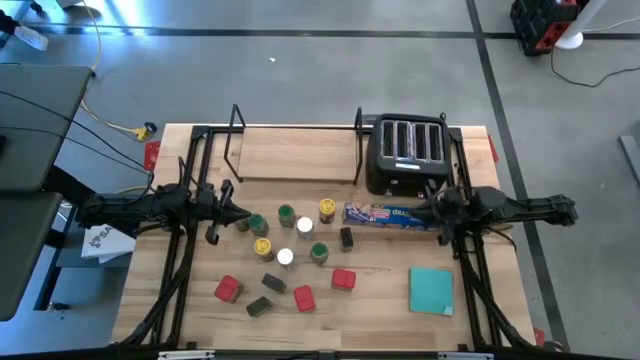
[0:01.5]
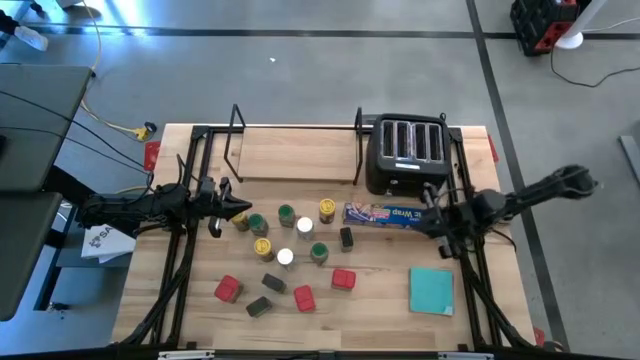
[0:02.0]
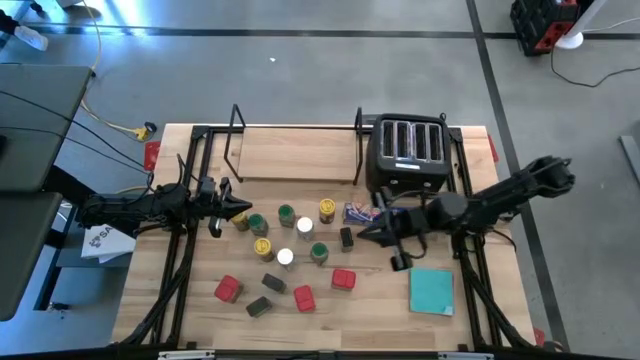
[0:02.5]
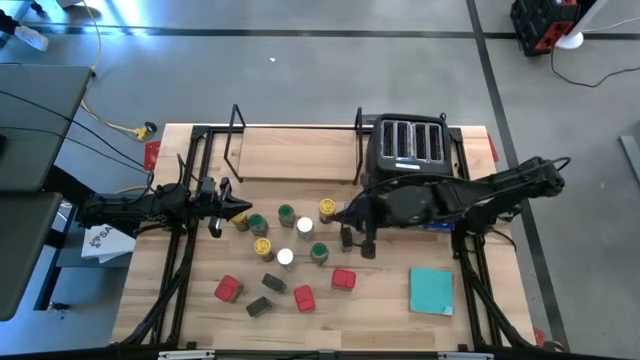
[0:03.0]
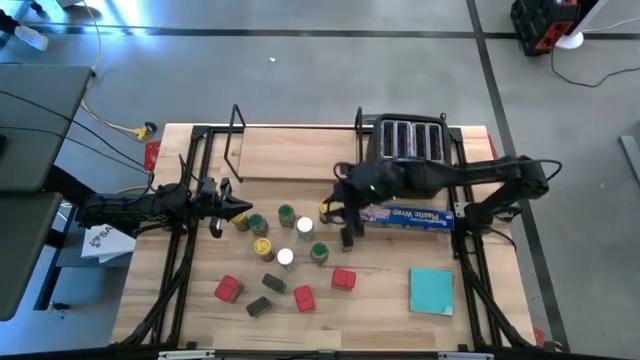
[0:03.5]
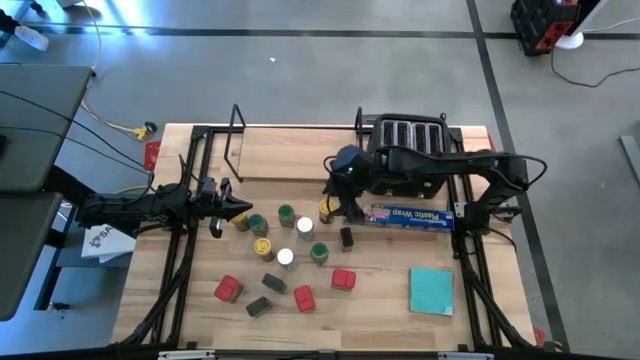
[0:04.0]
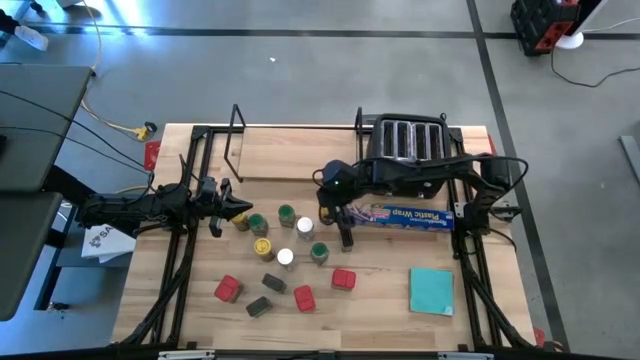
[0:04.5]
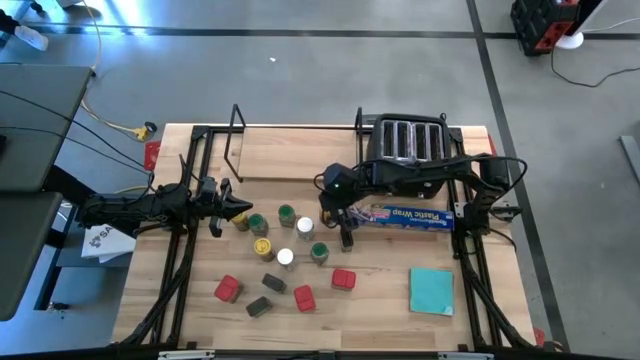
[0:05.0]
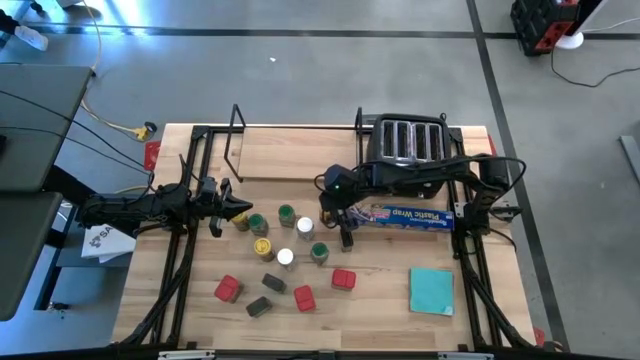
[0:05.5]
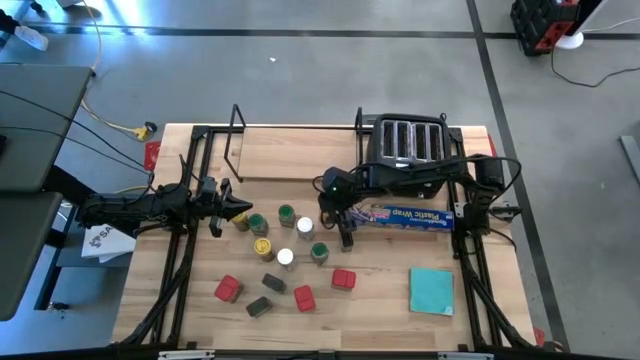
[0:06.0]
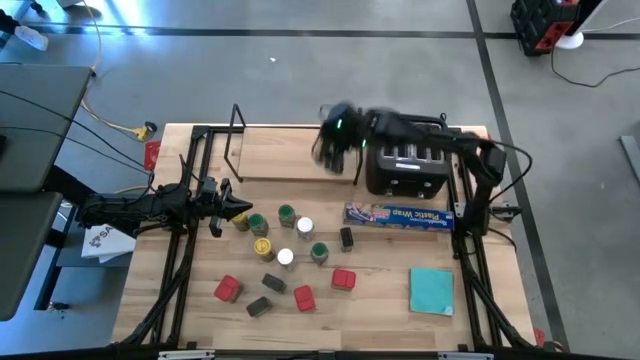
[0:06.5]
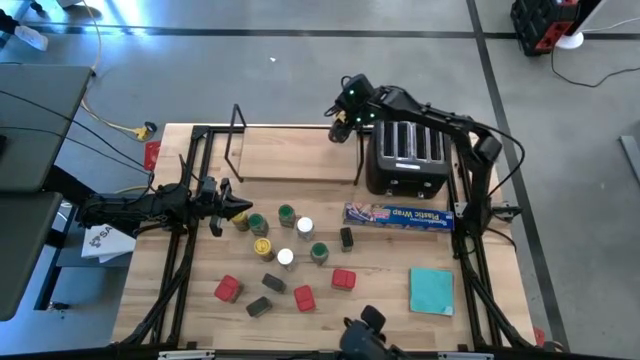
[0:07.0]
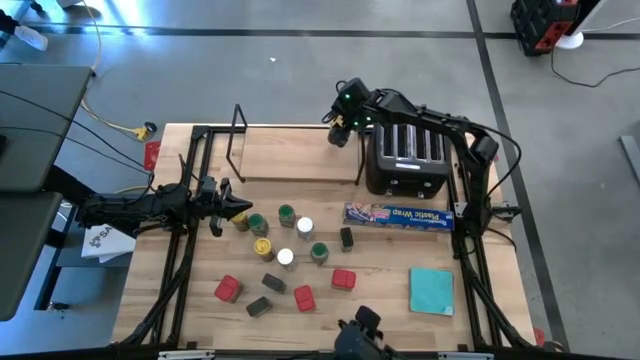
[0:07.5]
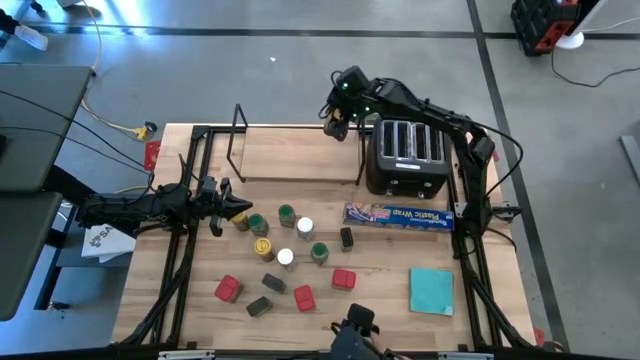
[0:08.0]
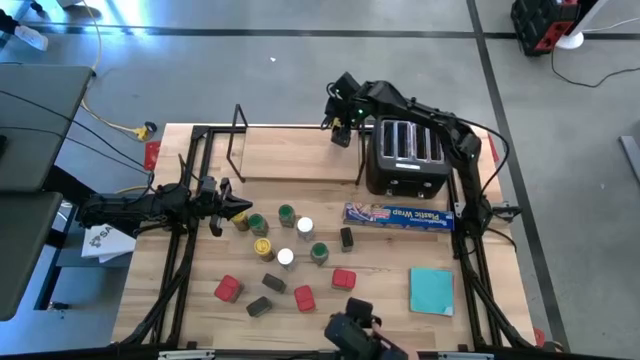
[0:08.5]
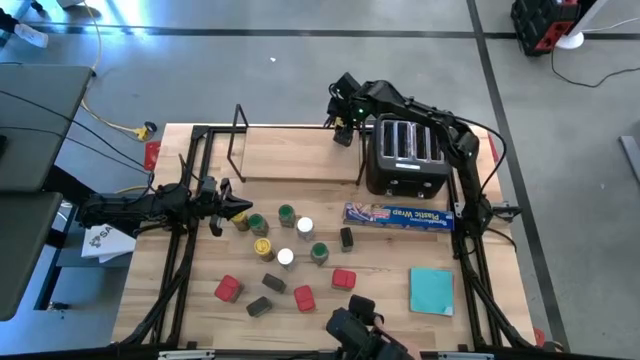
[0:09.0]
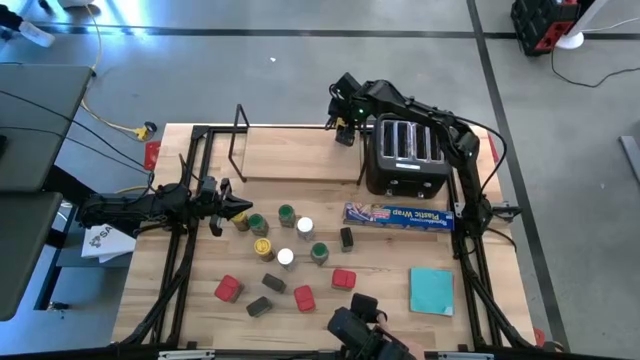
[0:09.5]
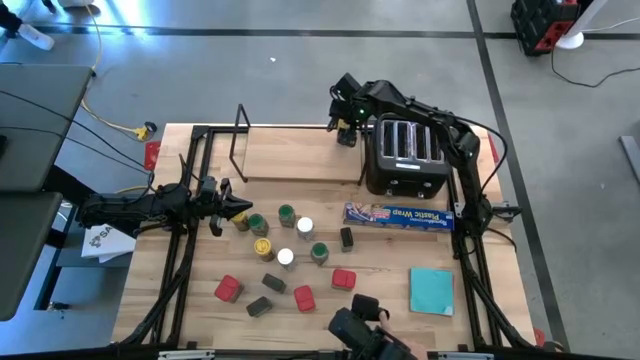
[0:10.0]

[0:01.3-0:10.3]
Task: Shelf spices
Put the top right yellow seasoning bottle on the shelf

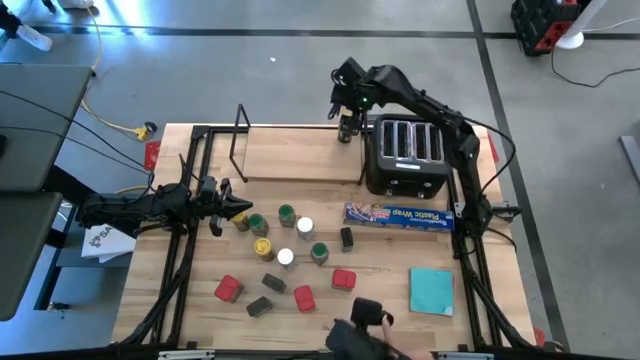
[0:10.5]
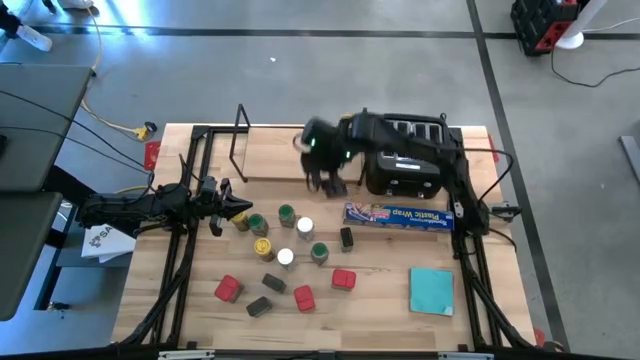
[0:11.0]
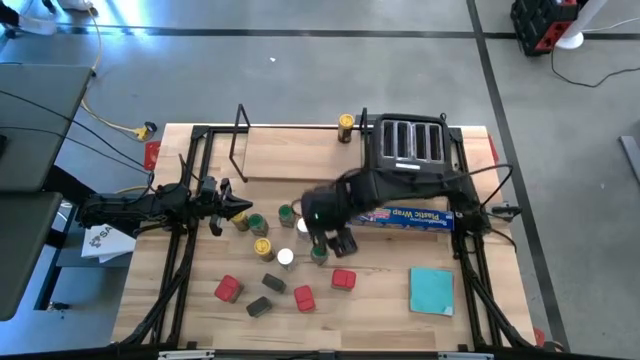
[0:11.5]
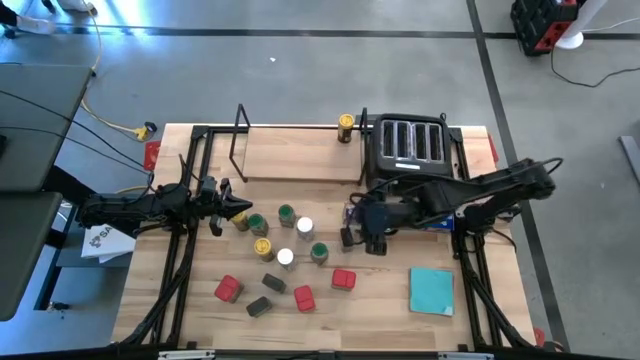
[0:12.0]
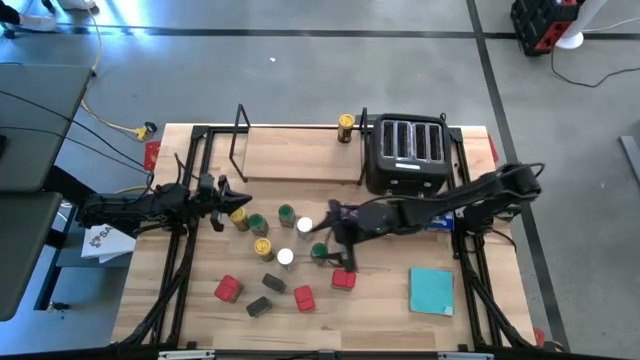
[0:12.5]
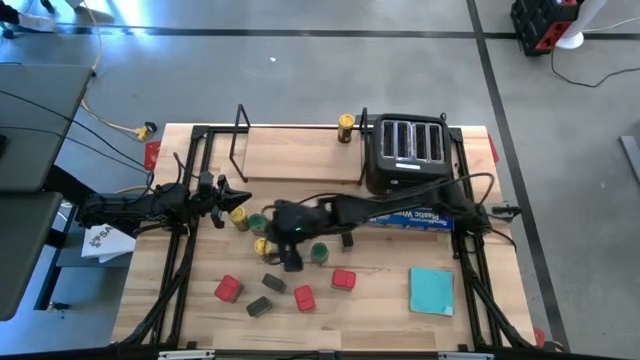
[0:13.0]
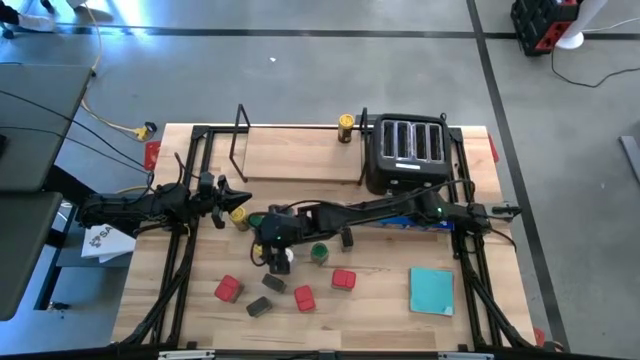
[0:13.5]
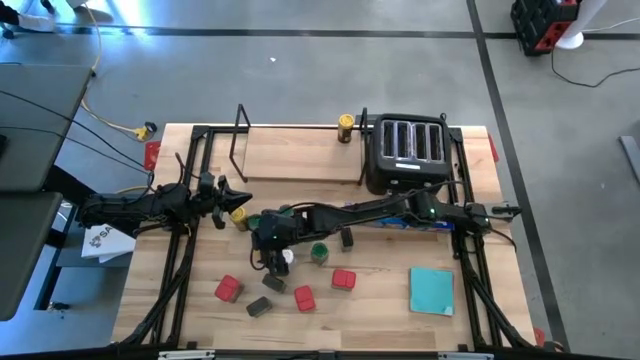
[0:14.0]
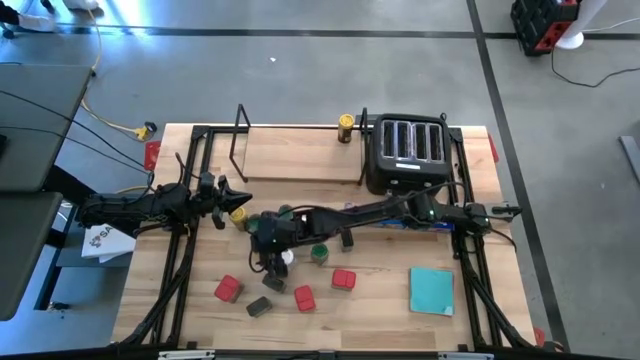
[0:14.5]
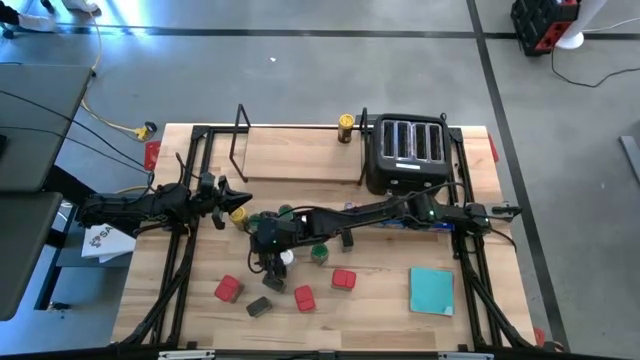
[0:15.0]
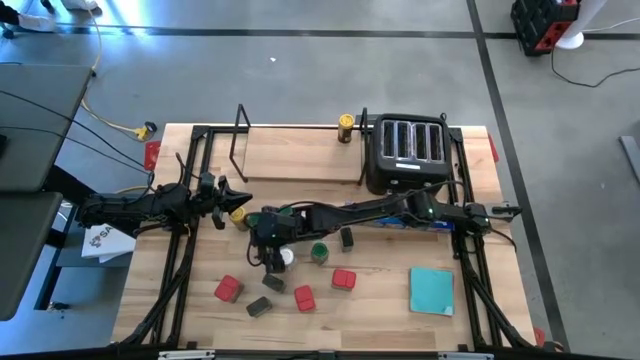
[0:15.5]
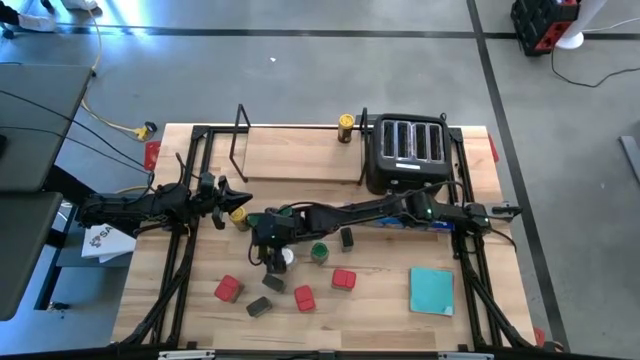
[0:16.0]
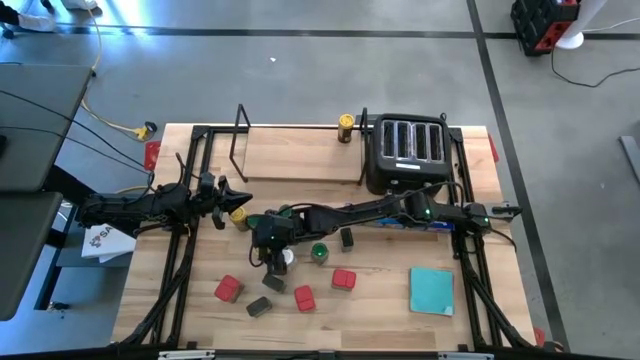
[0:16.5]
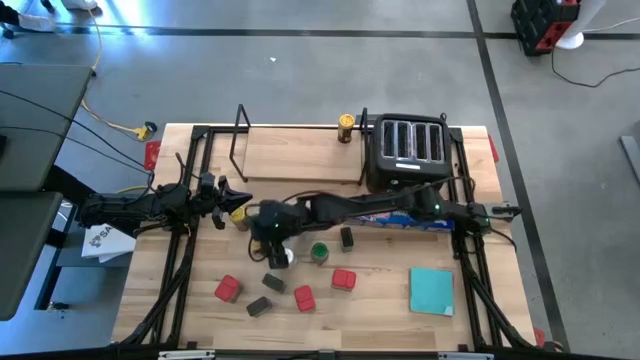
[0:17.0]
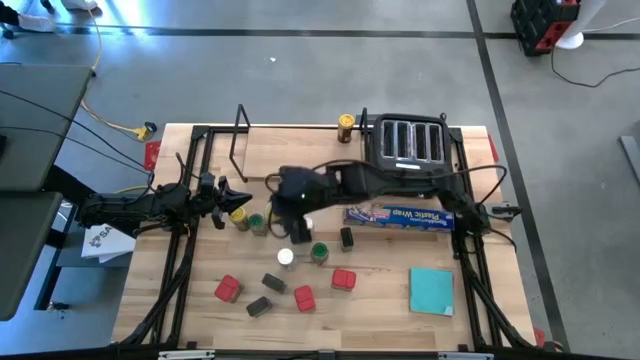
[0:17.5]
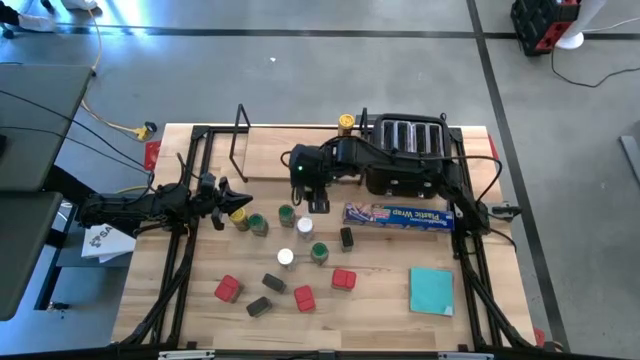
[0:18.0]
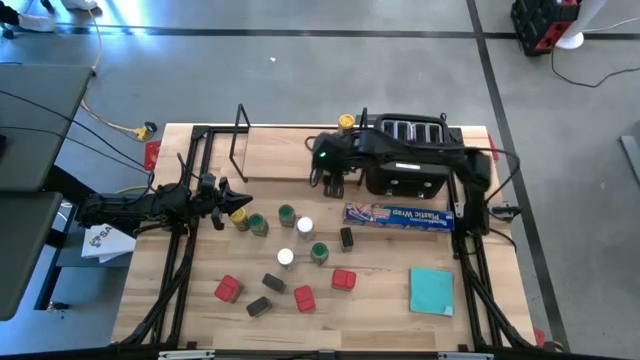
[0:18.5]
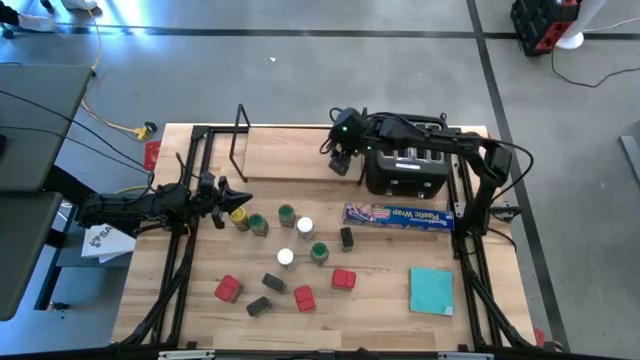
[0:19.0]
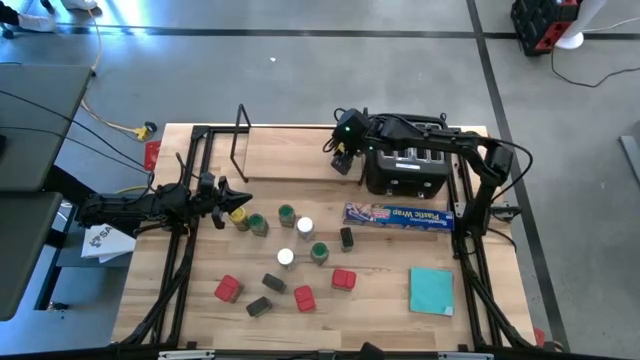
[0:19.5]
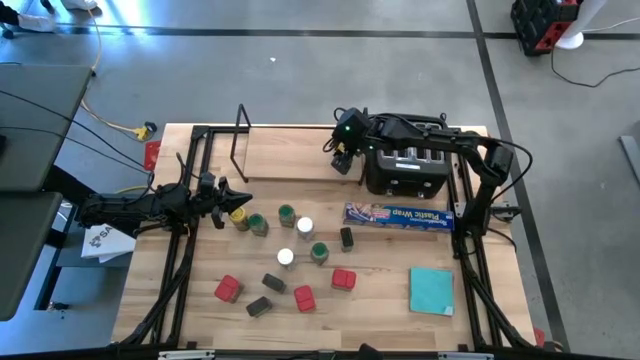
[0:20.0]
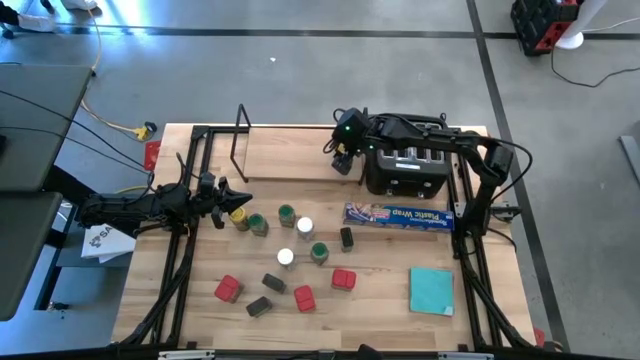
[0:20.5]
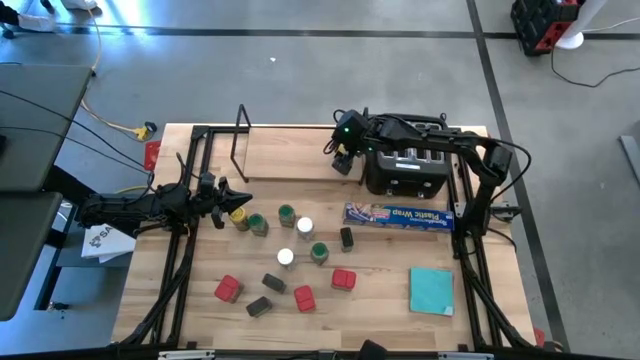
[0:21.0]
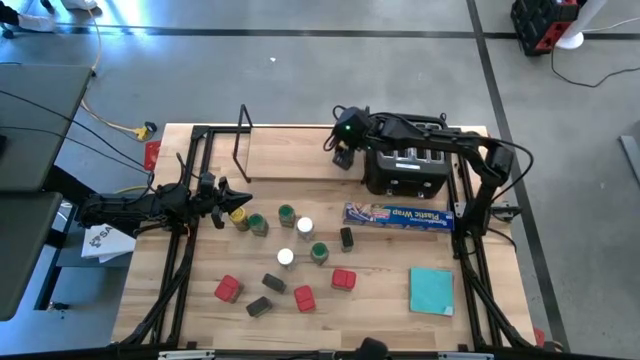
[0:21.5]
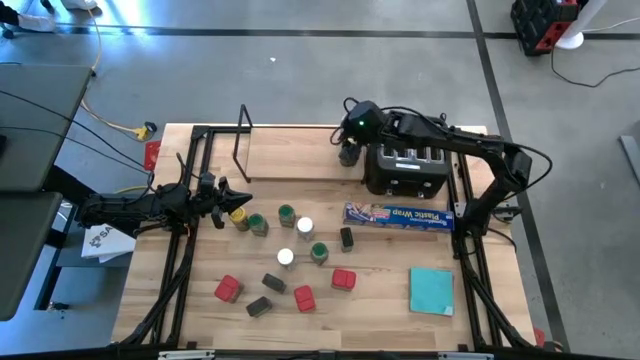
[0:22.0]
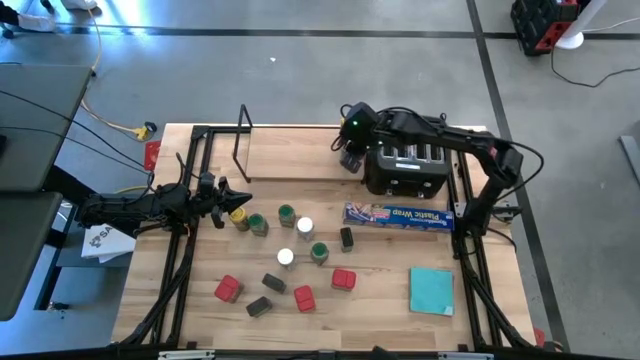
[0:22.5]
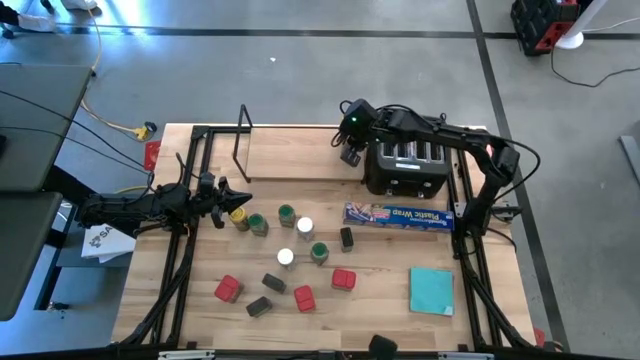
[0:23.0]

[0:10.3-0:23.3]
Put the bottom yellow seasoning bottle on the shelf aligned with the other yellow seasoning bottle
